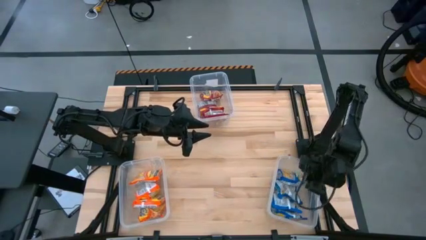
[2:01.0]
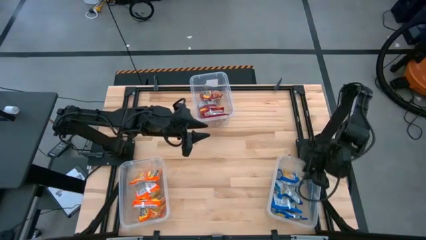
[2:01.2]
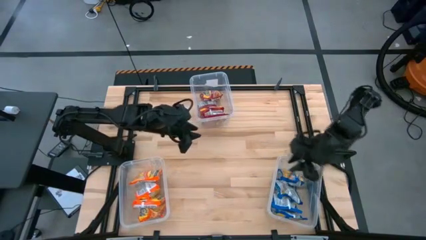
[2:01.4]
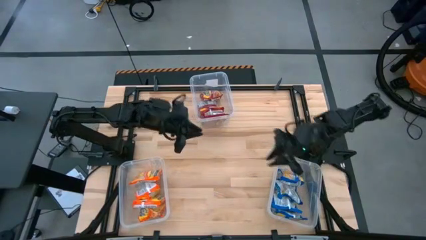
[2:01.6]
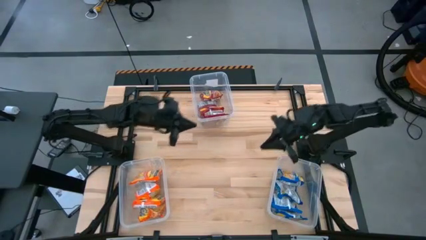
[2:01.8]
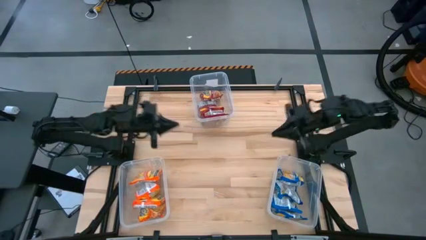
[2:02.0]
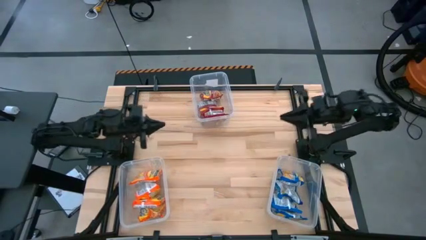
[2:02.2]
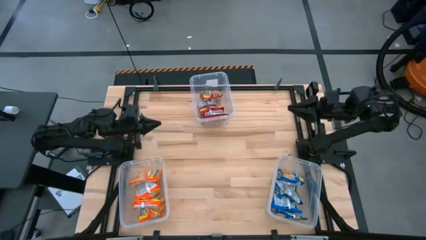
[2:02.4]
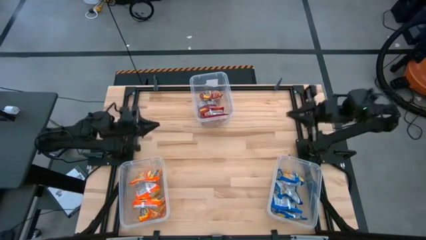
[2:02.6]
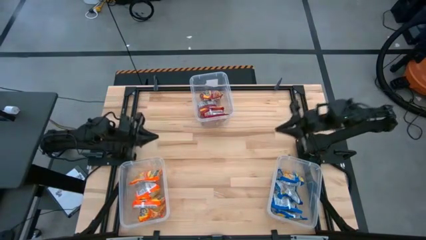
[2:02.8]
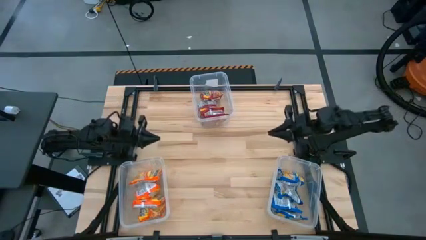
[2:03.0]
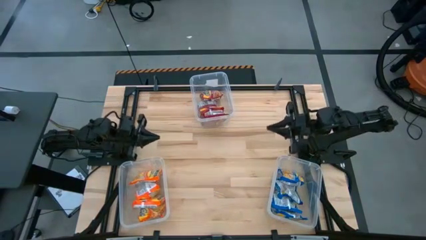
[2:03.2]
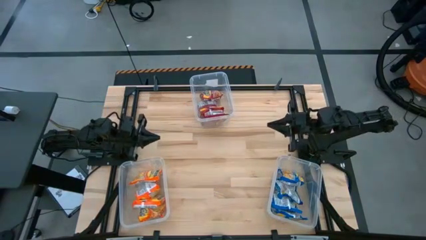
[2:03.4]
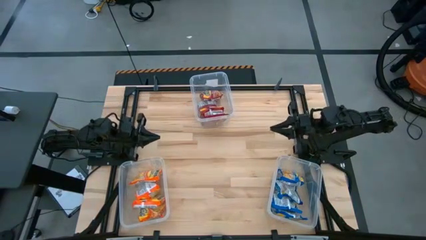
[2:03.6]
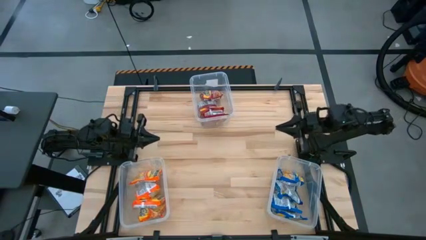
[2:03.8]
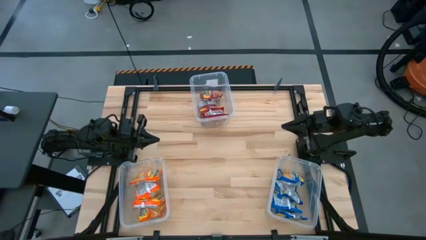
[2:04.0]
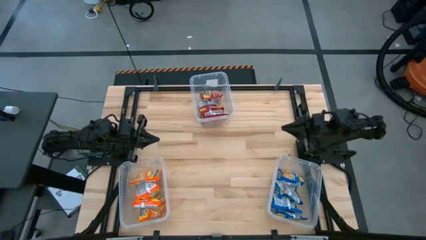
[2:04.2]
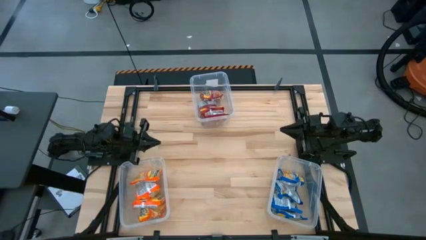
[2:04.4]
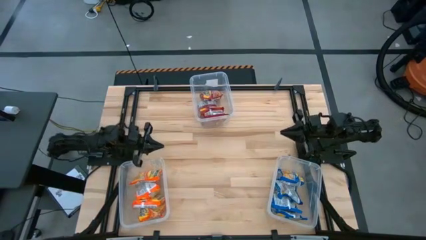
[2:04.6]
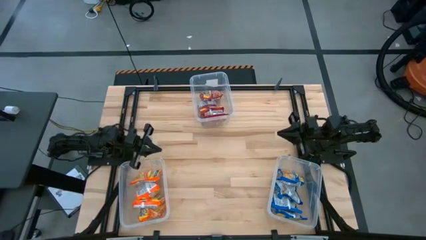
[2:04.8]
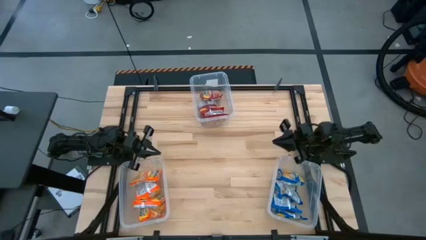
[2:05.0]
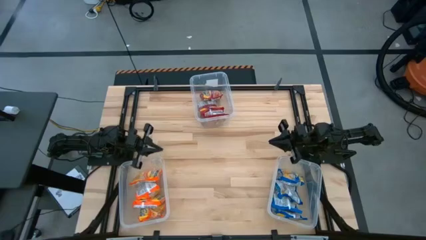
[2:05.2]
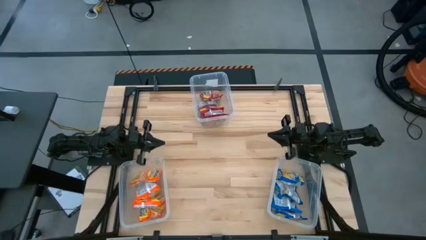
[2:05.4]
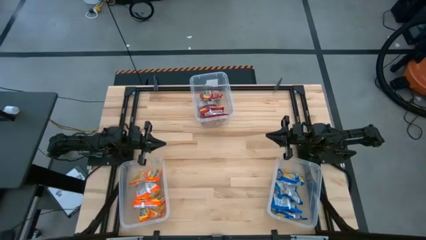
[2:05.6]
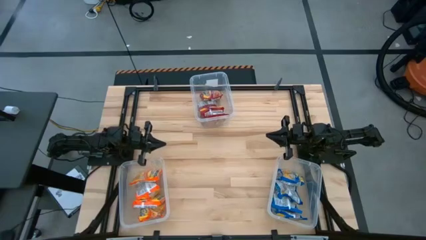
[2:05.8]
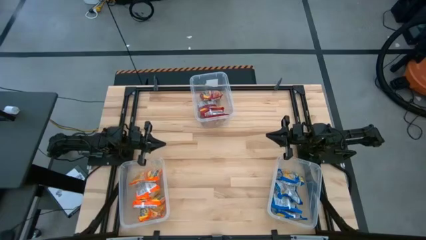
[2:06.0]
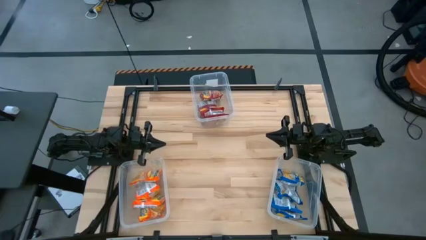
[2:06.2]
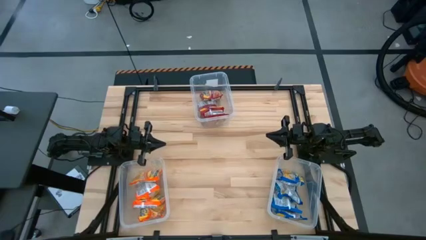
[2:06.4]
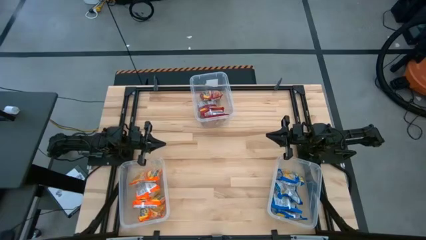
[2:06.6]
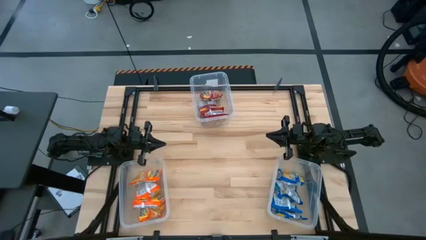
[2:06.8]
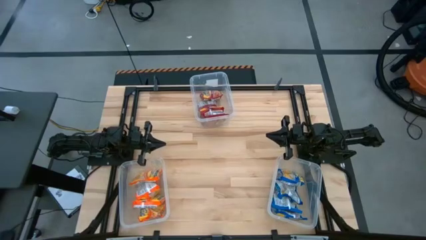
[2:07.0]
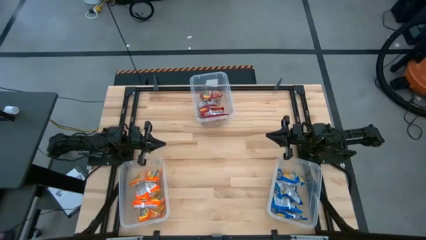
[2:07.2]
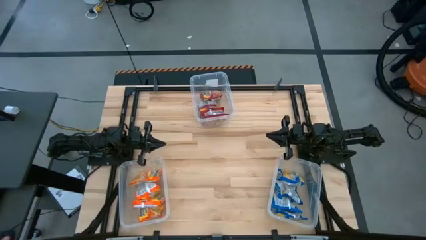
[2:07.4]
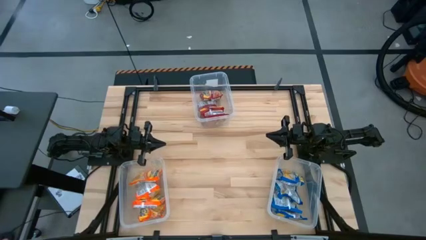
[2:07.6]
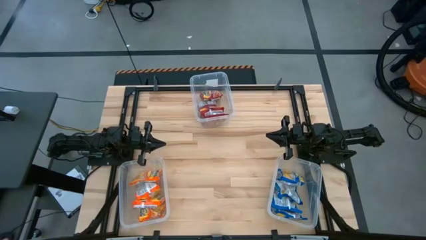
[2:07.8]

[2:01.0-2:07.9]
Task: Sort Maruchan noodles
Return to Home Position

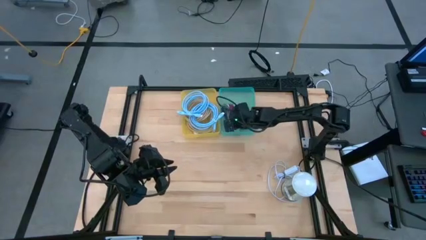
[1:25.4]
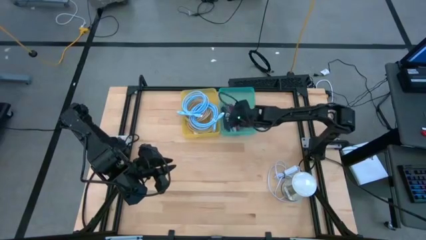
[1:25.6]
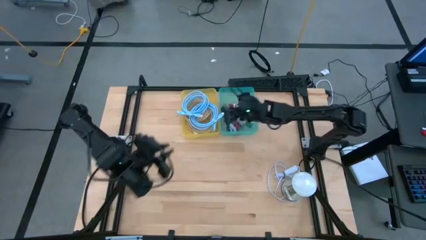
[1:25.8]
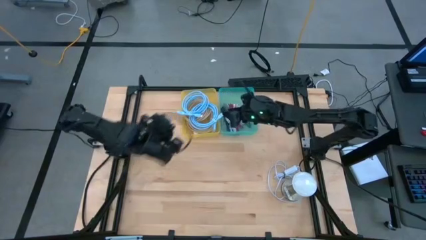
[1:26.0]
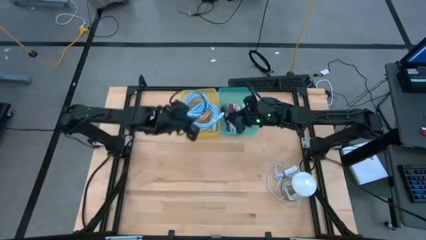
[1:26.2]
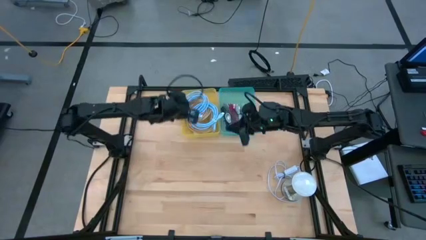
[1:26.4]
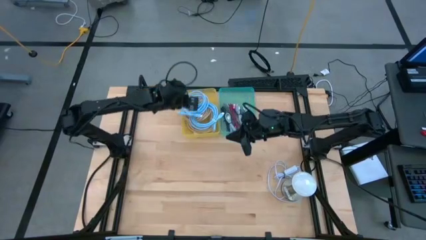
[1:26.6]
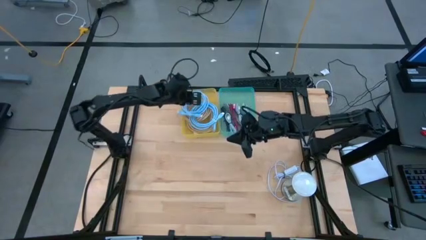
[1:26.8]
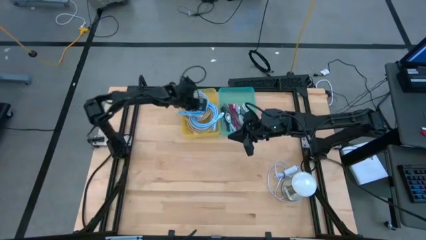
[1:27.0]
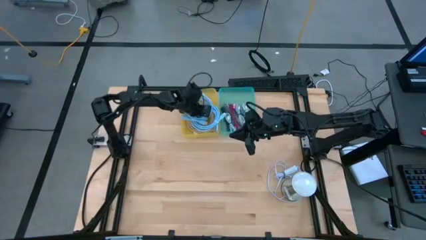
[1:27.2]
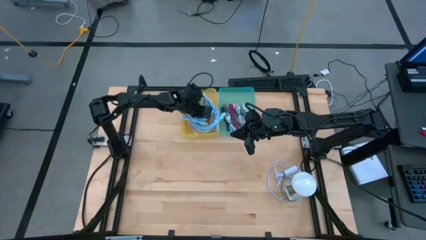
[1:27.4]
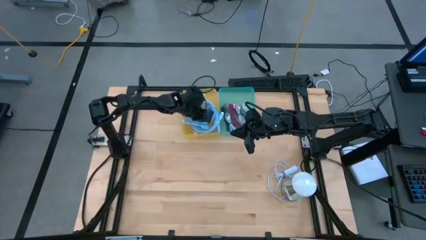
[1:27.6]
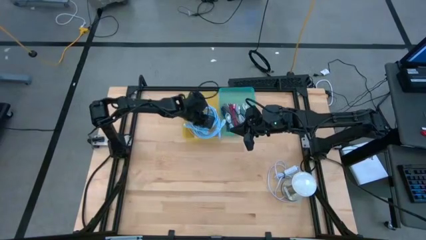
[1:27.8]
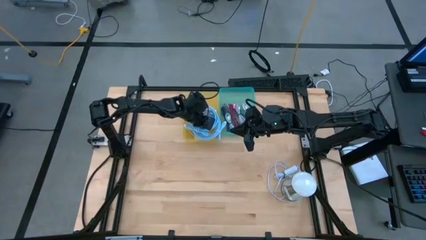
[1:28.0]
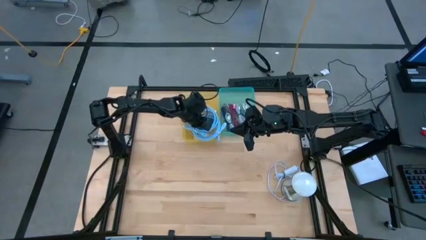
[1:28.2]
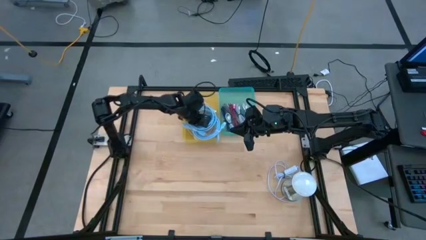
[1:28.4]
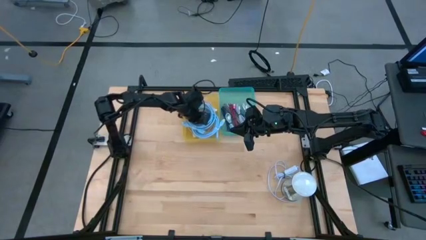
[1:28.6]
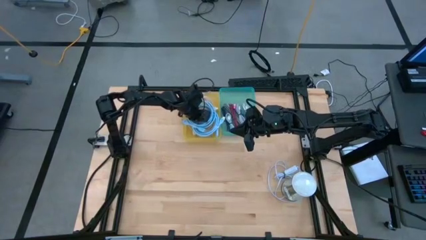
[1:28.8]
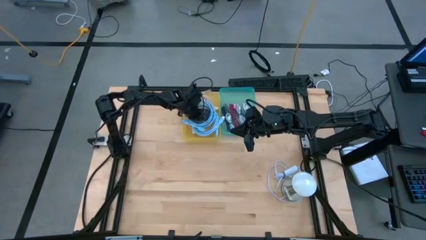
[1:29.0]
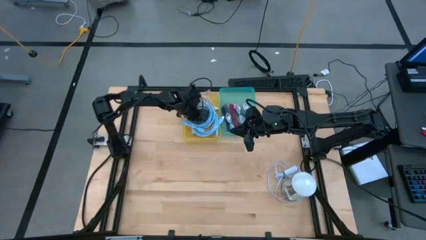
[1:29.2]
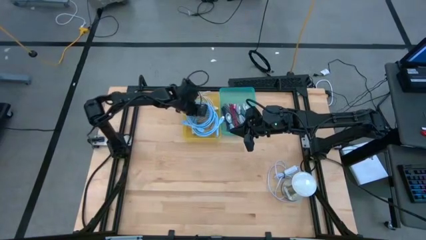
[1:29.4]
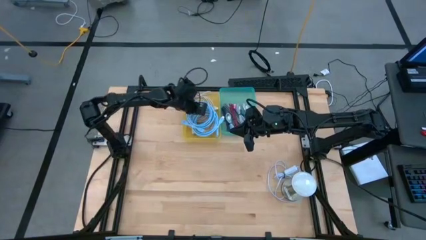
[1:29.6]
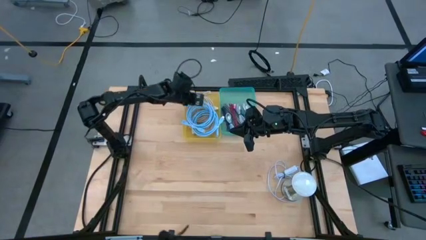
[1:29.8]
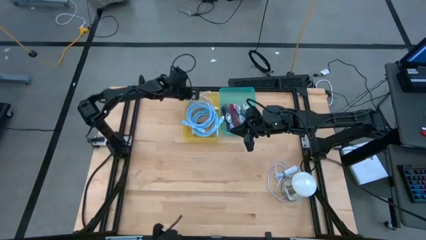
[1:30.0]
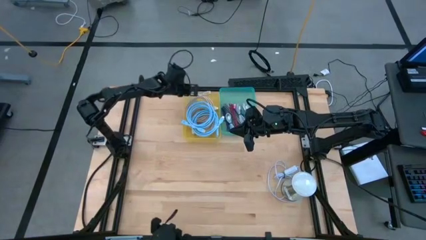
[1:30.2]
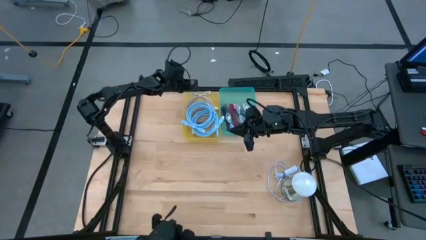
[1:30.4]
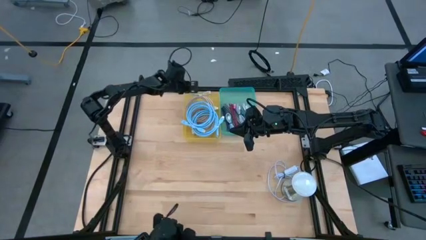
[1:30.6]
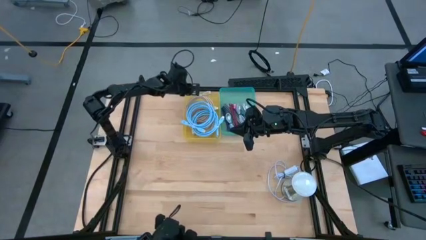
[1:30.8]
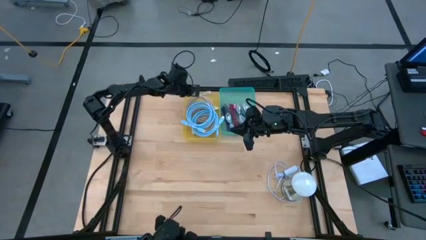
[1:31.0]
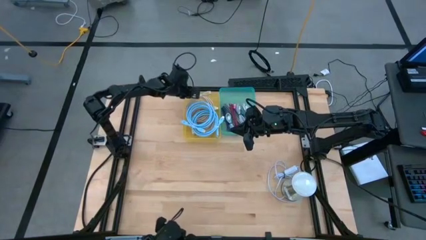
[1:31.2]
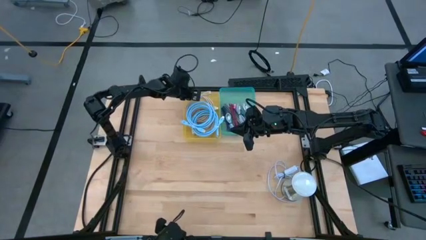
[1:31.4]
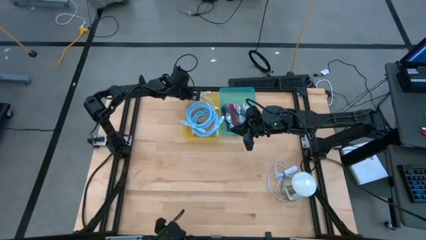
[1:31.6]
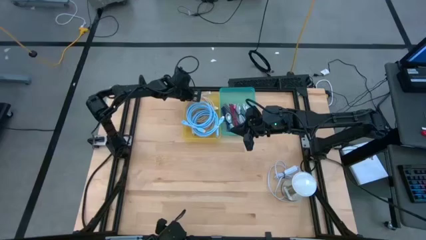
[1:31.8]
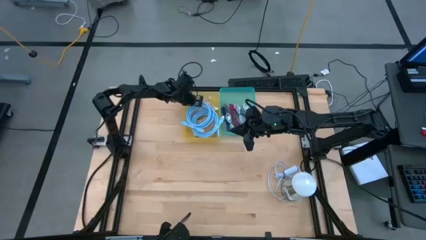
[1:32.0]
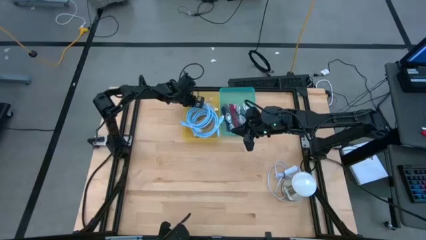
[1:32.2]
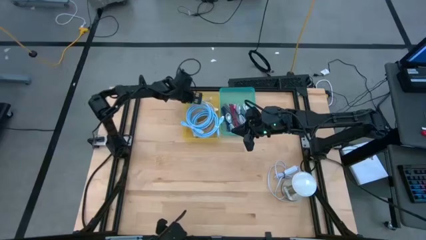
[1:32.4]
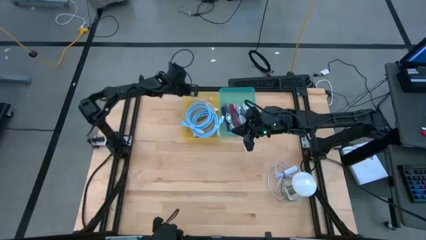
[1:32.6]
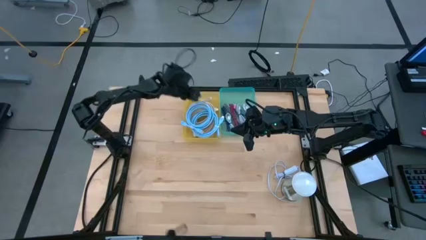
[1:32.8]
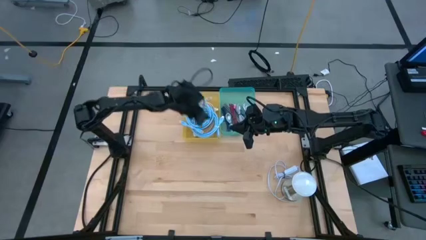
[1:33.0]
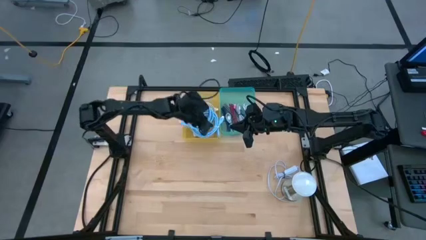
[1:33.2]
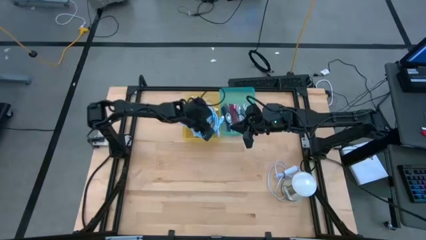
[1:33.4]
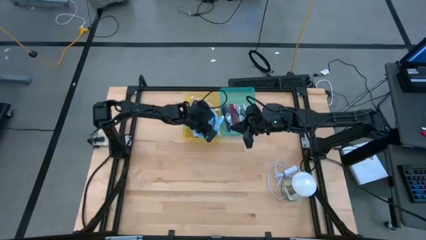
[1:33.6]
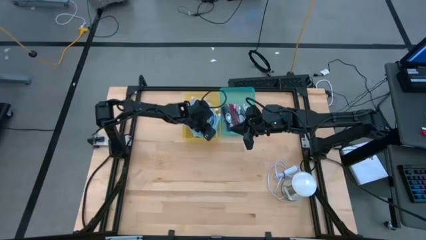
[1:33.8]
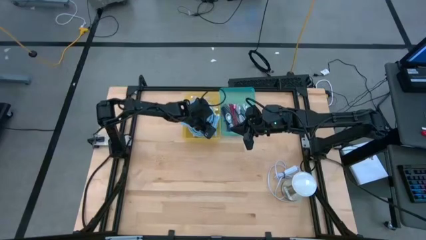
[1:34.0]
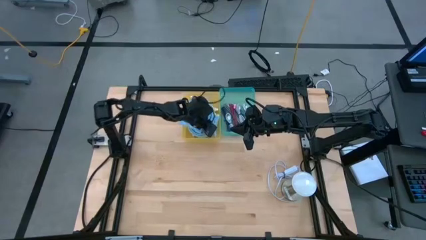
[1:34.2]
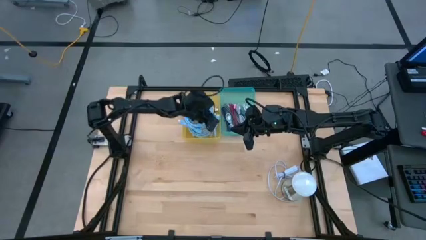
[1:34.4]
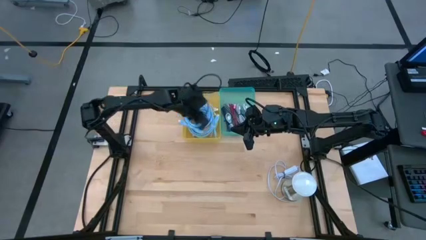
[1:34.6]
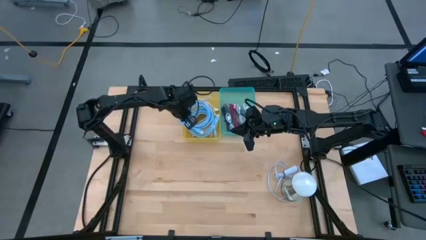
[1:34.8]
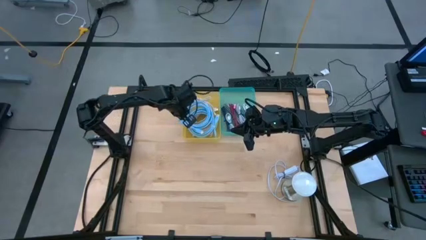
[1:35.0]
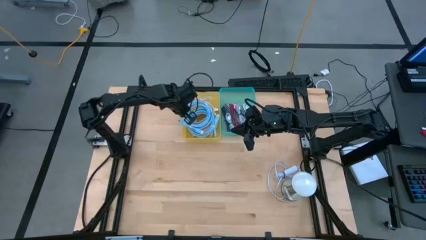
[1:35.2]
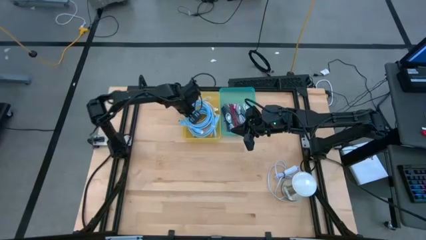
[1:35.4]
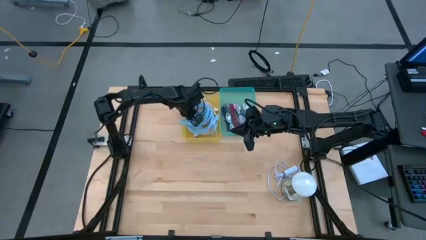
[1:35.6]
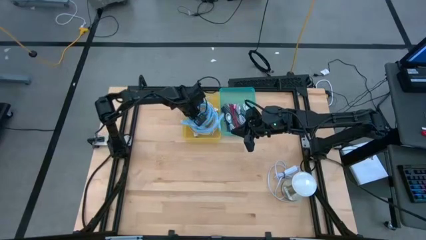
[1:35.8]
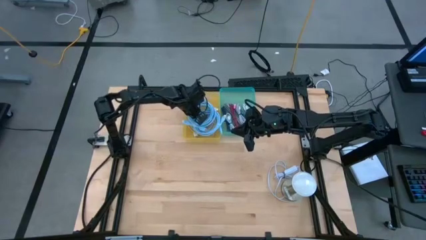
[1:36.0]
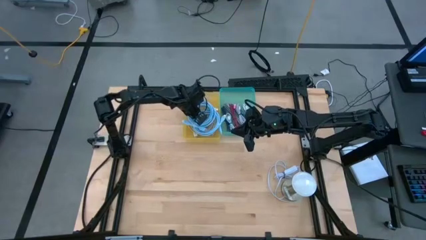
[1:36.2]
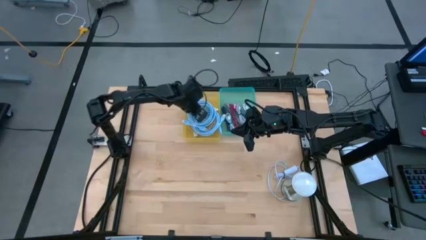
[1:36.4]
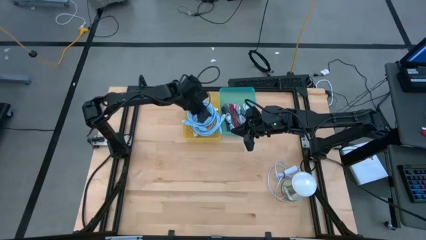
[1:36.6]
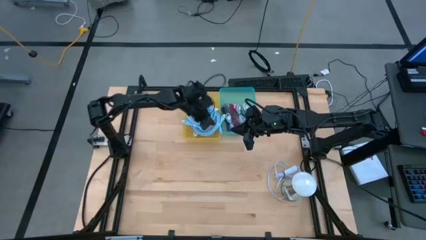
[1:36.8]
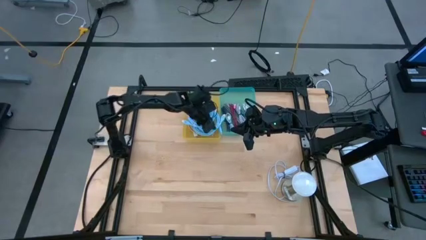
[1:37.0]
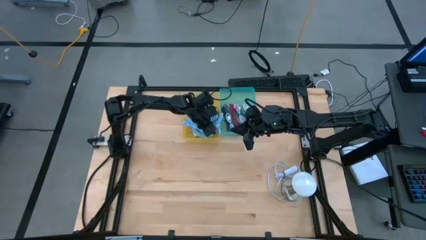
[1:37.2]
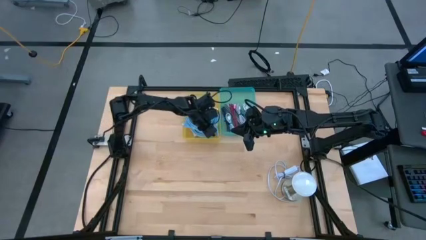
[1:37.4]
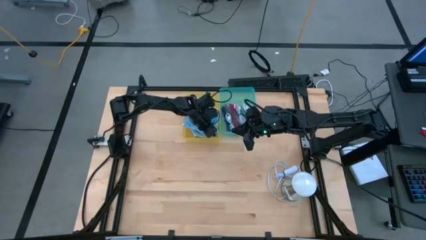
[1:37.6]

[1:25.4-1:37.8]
Task: Pick and place USB-C Cables
Adjust the large charger cables in the yellow bin
